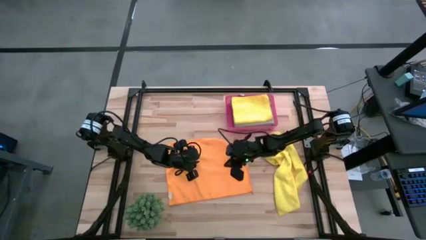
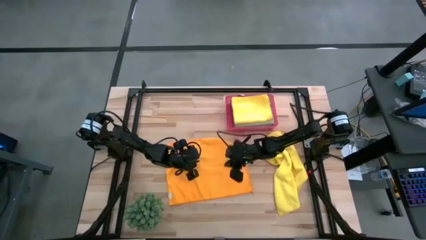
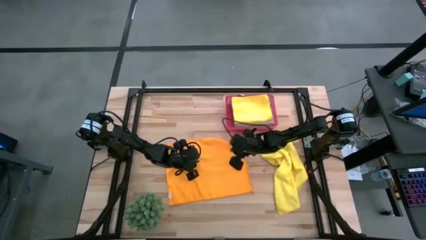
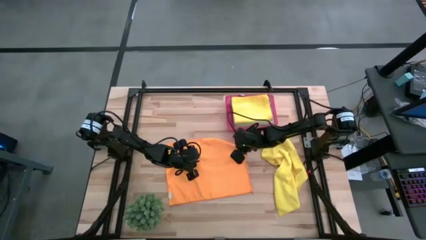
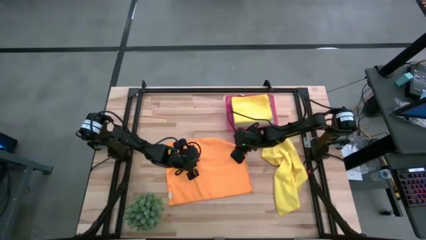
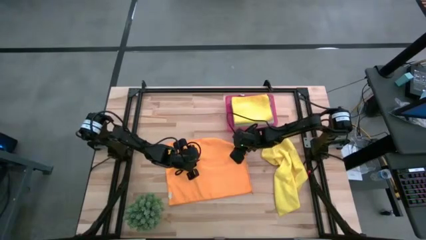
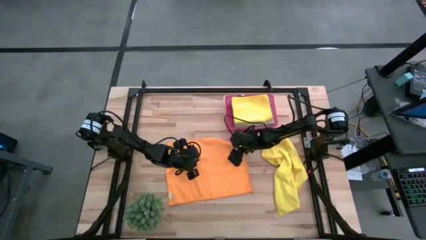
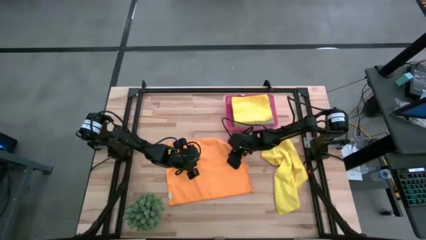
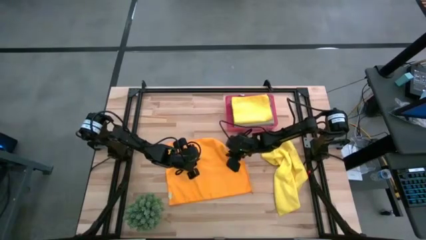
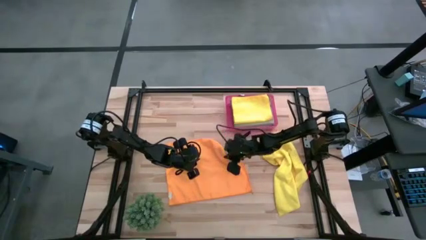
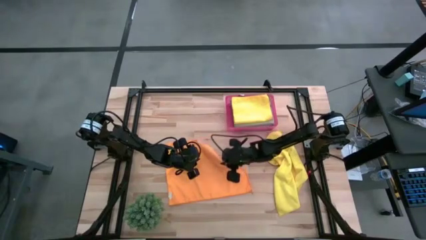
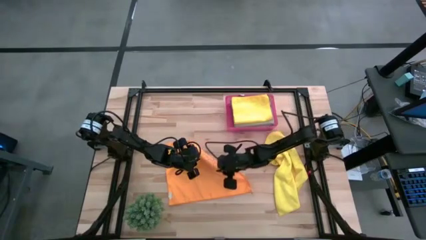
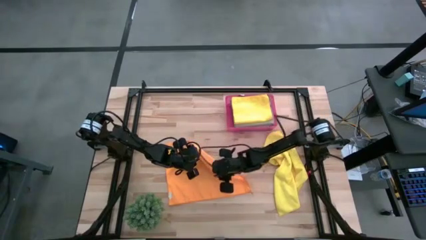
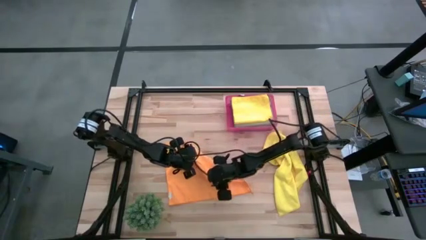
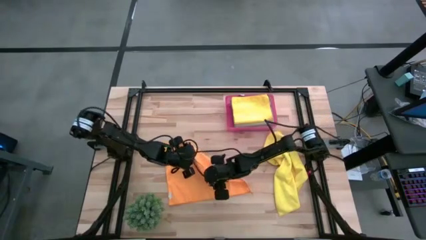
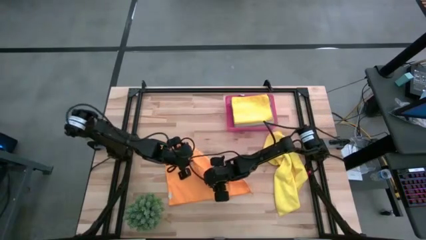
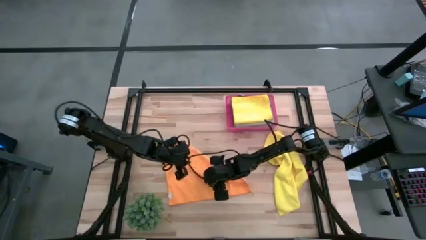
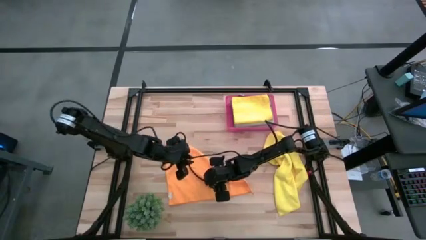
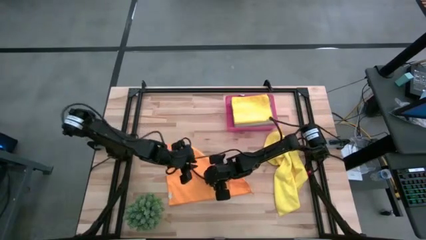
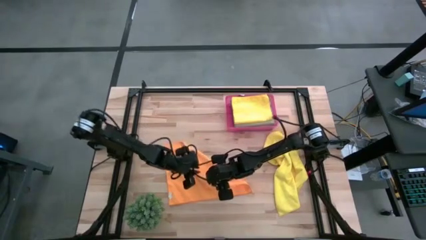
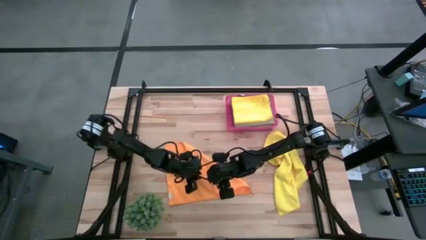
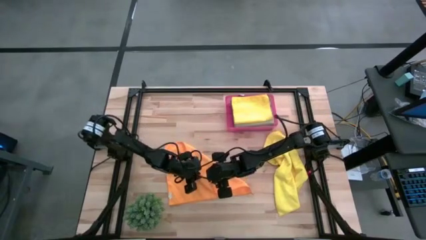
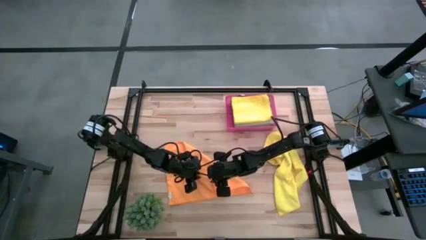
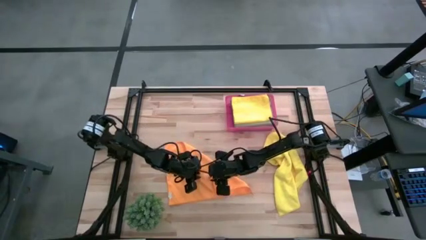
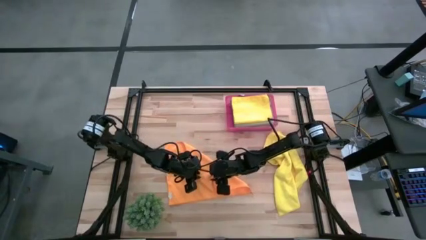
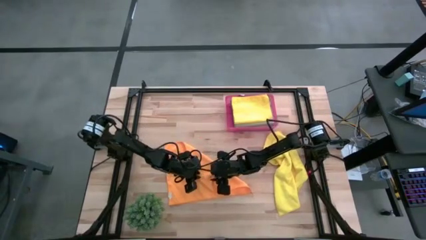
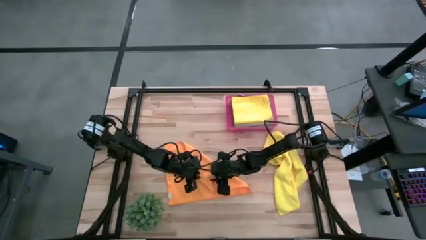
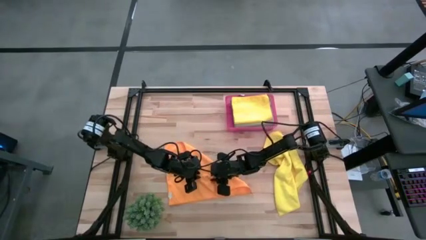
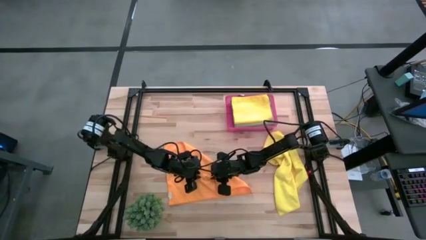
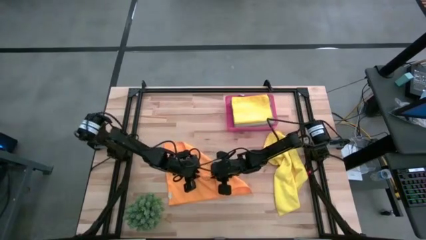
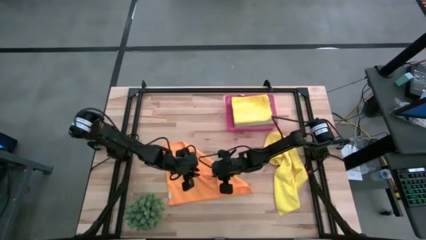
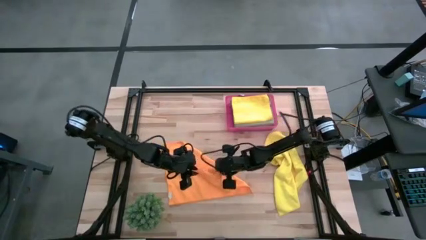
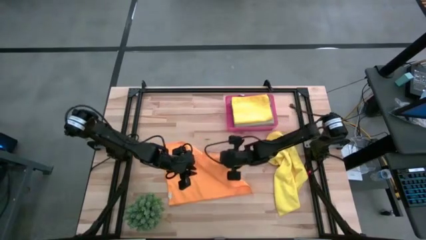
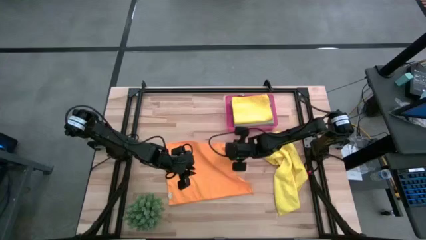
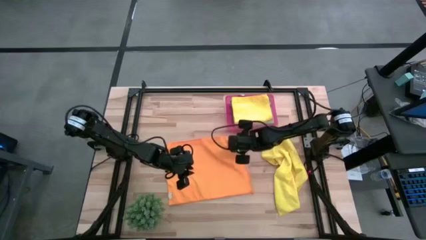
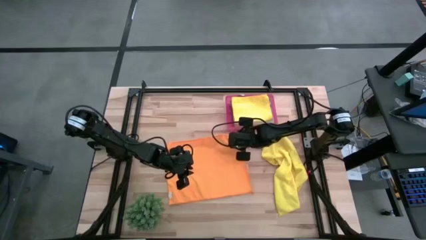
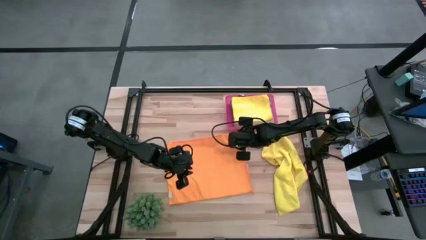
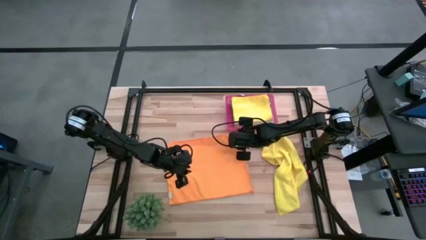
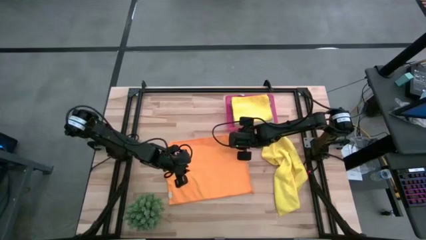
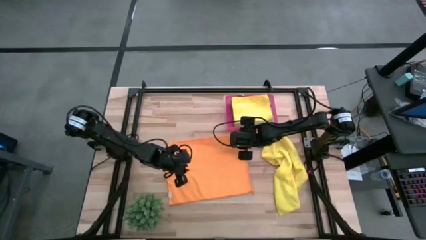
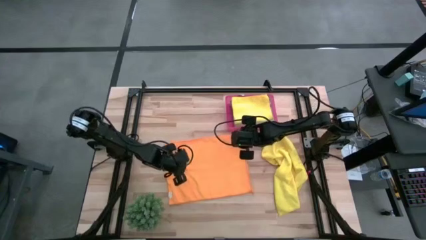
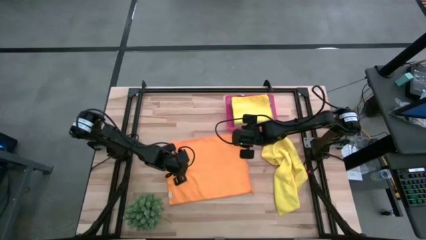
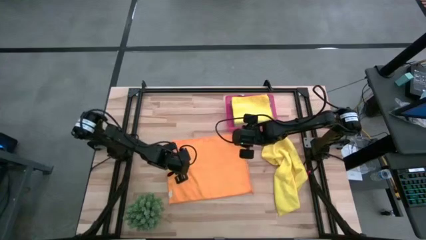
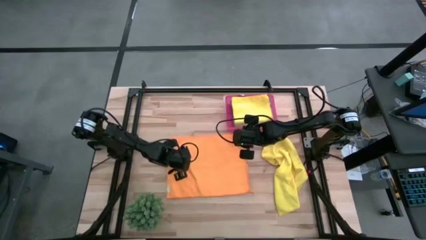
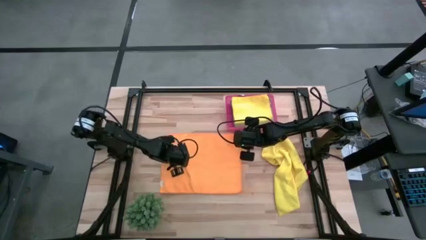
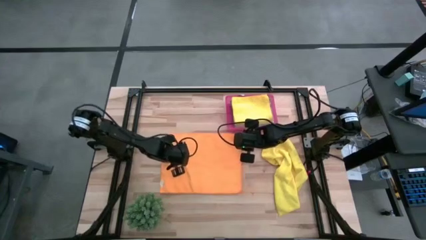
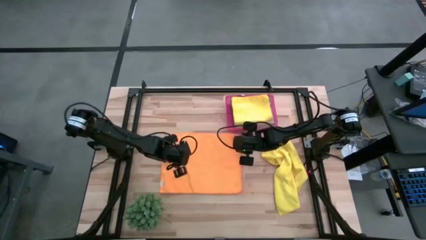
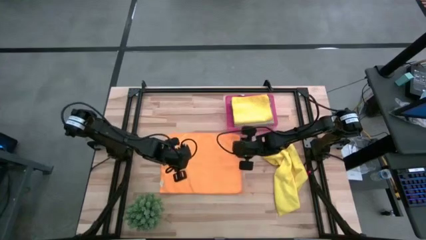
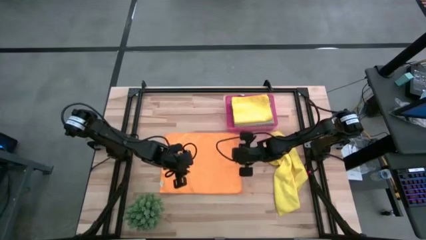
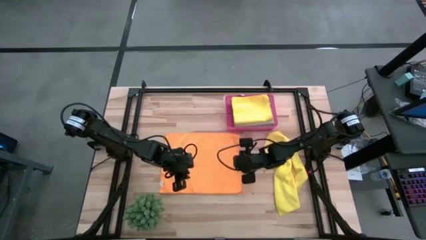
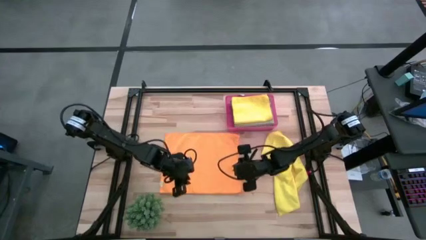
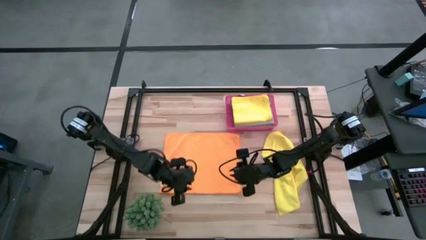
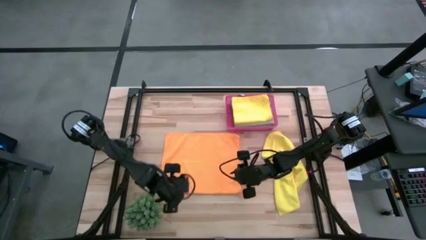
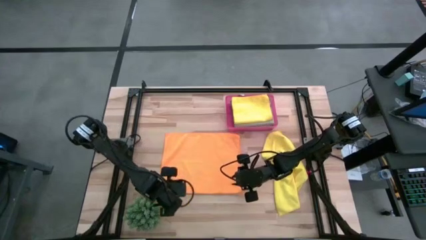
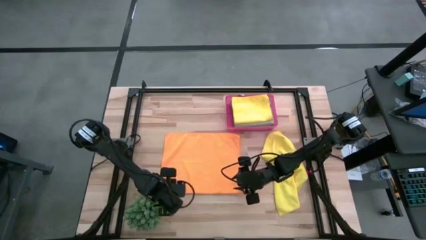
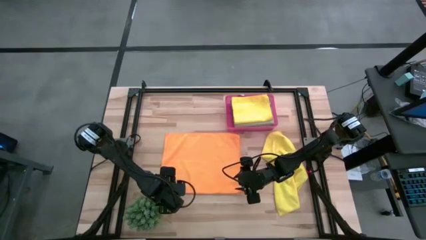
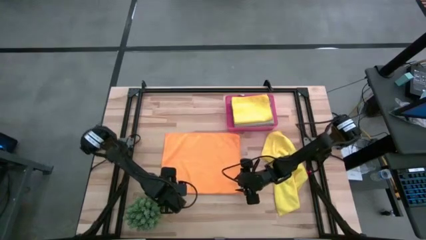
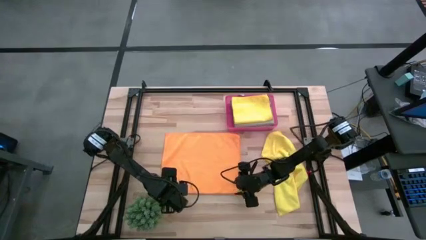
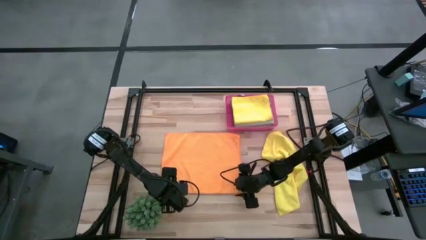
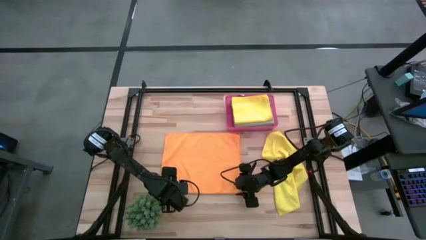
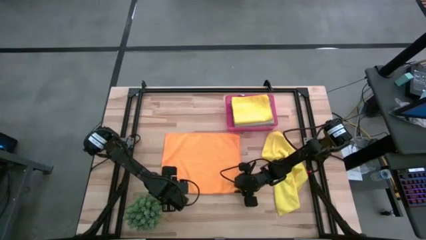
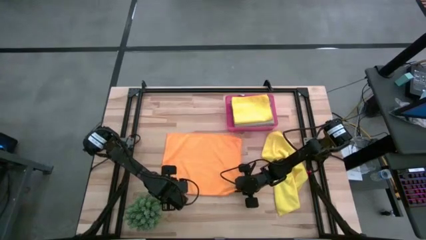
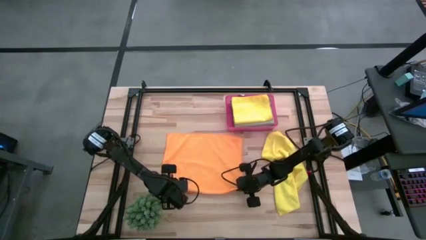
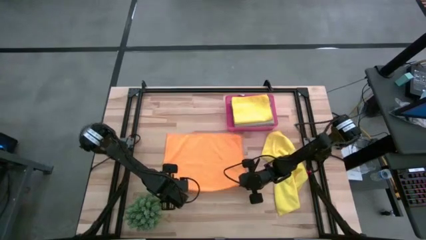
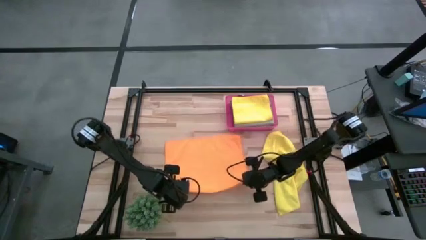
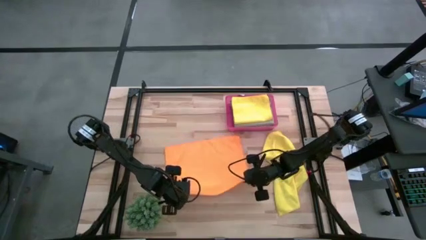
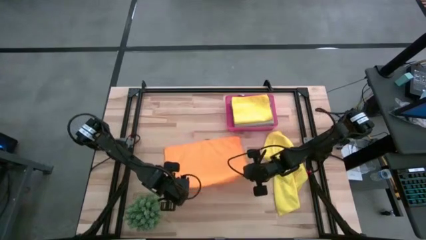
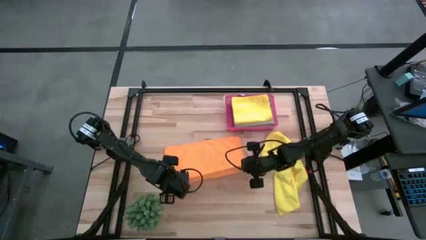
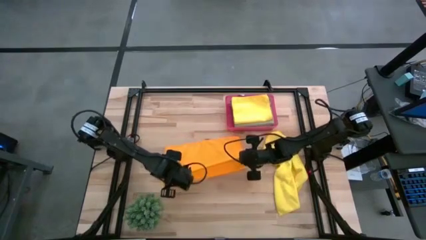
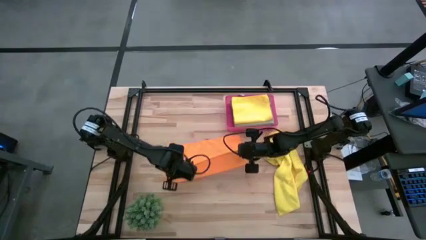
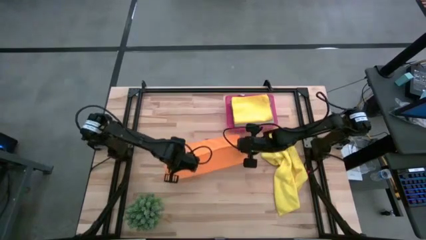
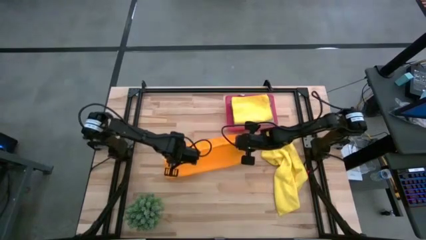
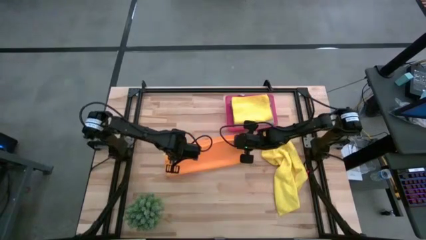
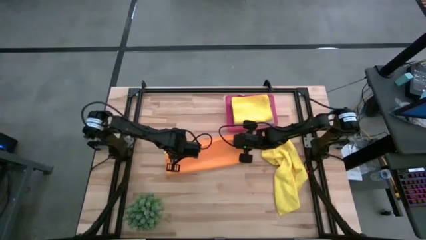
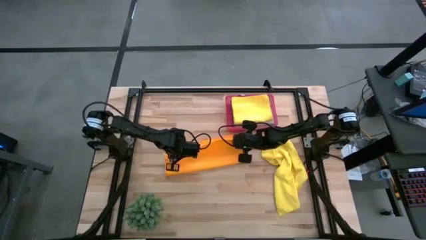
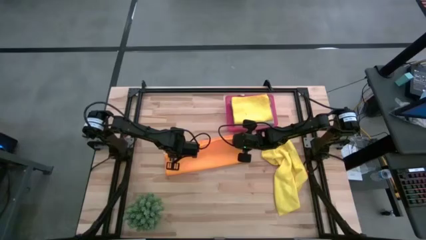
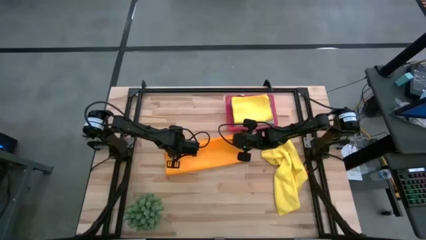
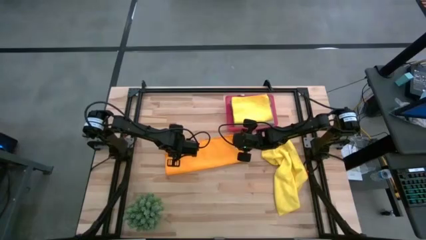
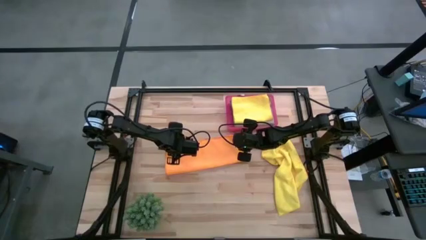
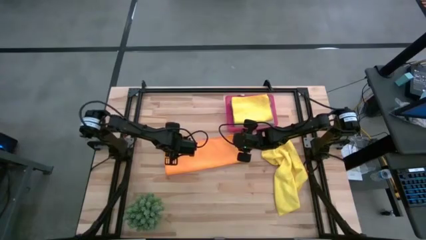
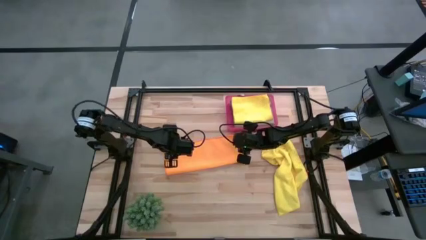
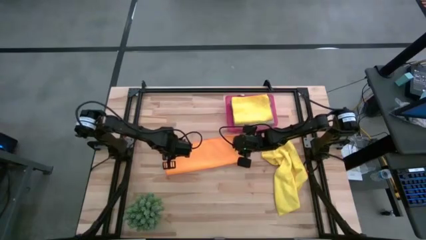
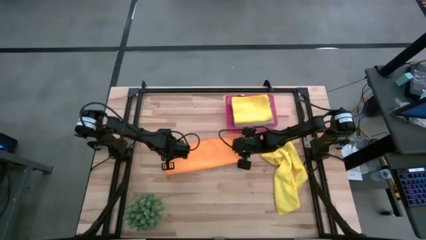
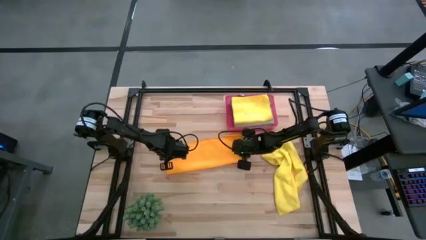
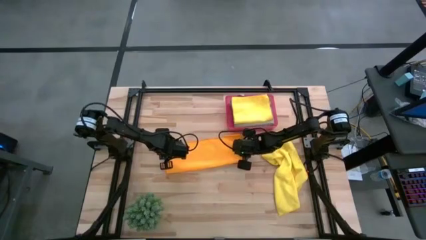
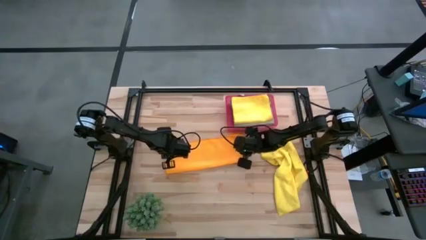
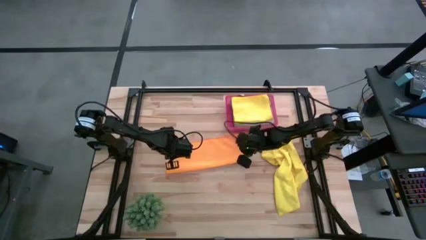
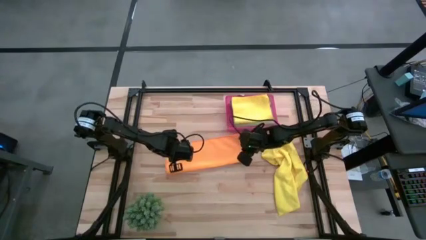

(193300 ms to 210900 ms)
Task: Fold microfiber towels
Fold the orange microfiber cloth
